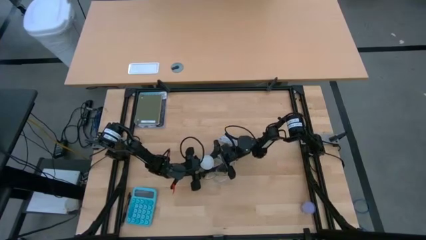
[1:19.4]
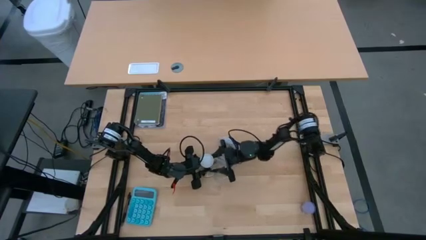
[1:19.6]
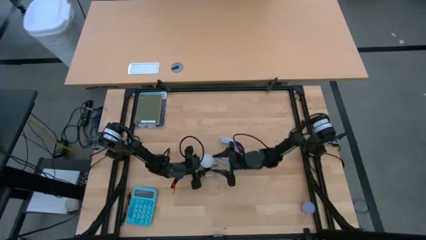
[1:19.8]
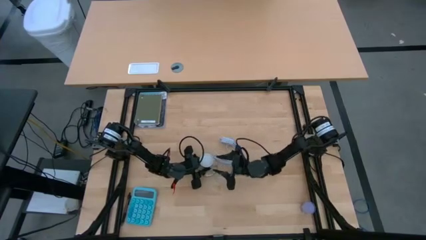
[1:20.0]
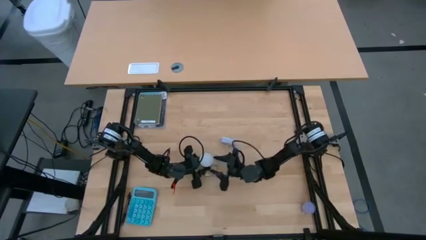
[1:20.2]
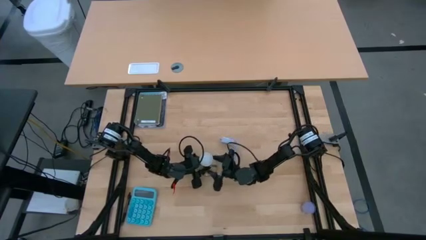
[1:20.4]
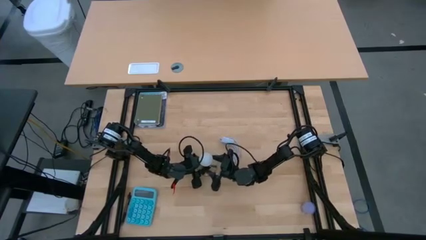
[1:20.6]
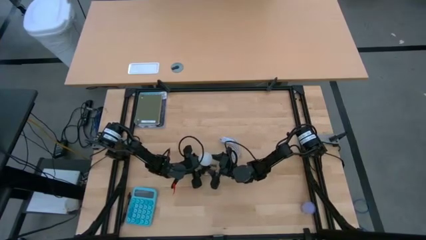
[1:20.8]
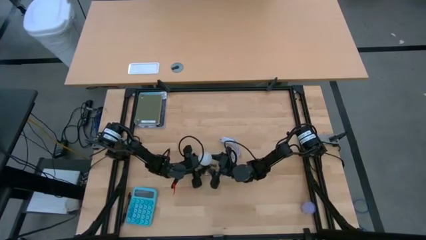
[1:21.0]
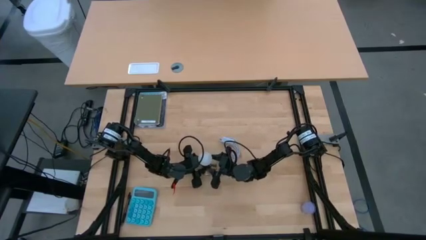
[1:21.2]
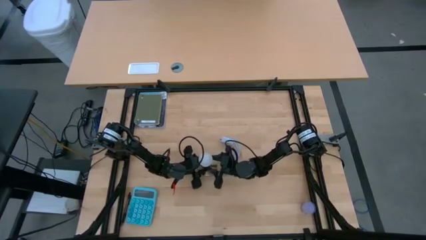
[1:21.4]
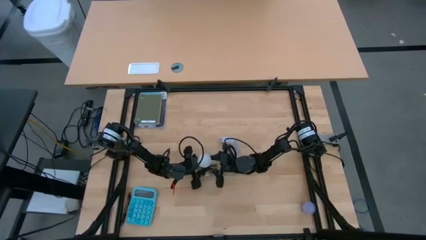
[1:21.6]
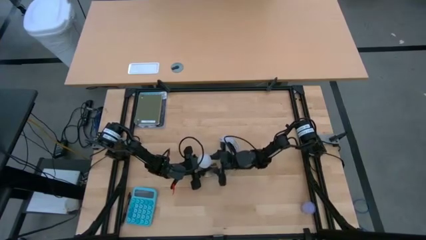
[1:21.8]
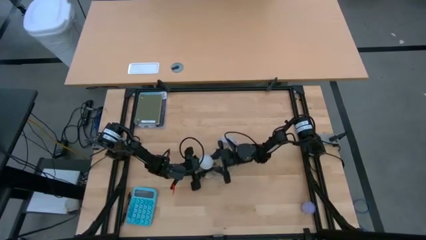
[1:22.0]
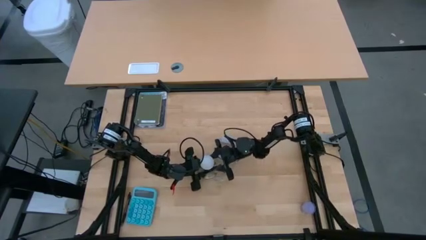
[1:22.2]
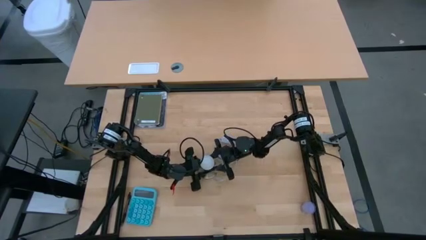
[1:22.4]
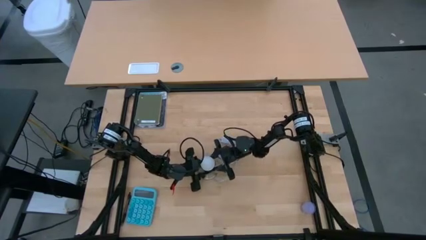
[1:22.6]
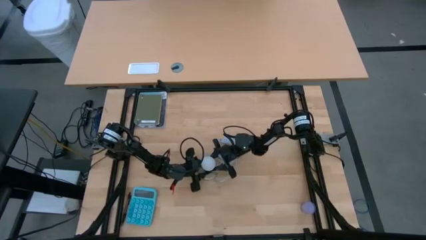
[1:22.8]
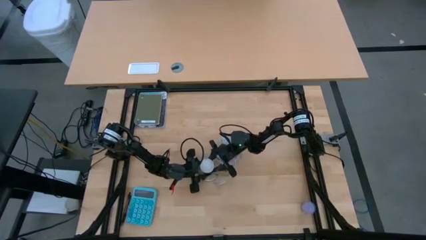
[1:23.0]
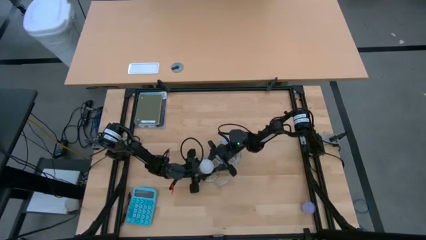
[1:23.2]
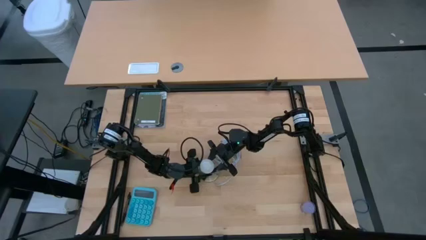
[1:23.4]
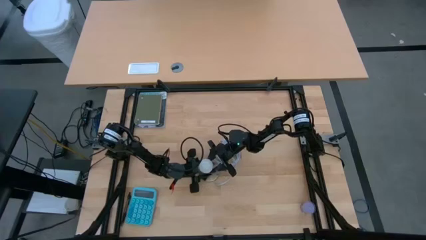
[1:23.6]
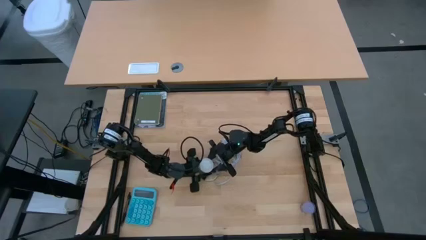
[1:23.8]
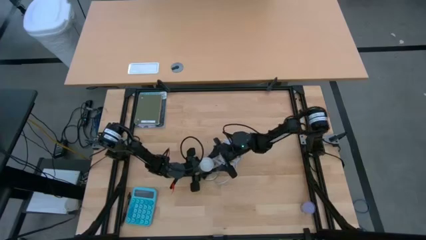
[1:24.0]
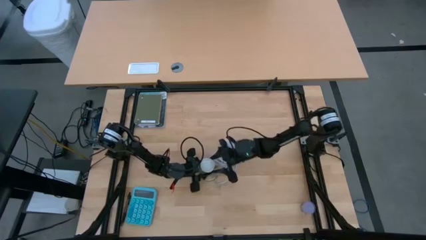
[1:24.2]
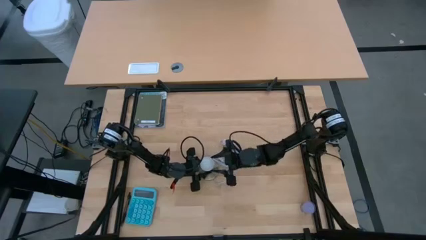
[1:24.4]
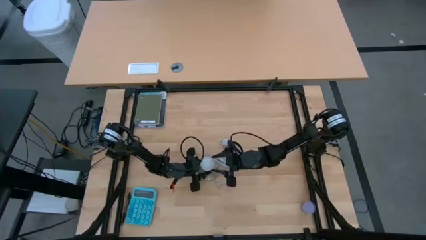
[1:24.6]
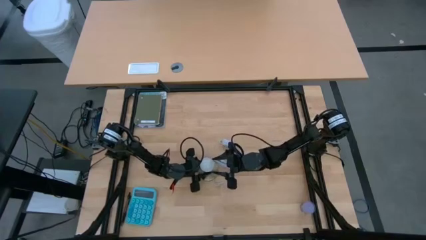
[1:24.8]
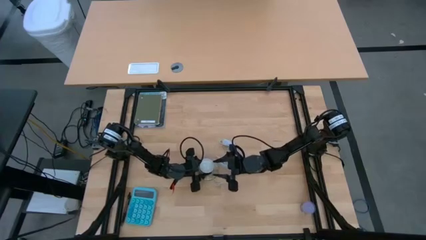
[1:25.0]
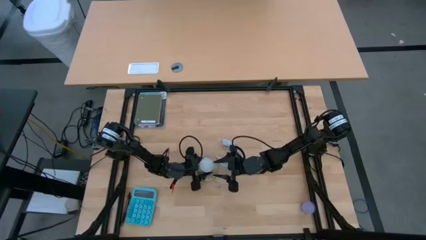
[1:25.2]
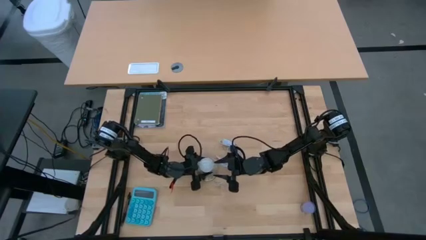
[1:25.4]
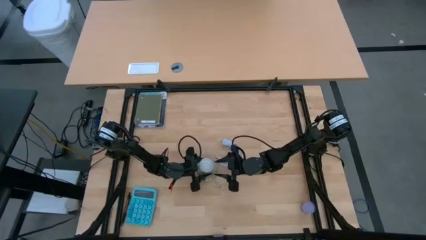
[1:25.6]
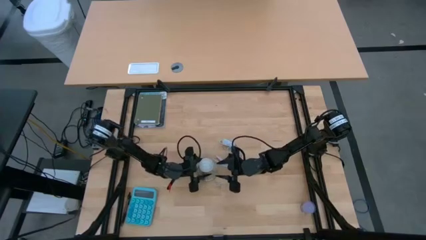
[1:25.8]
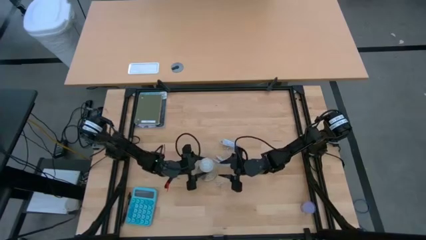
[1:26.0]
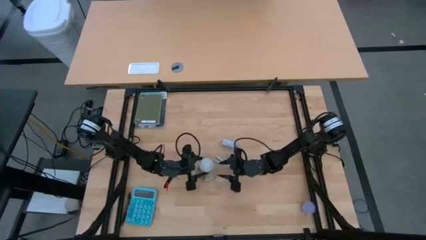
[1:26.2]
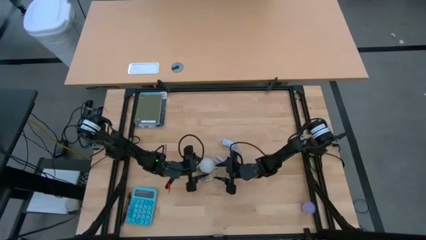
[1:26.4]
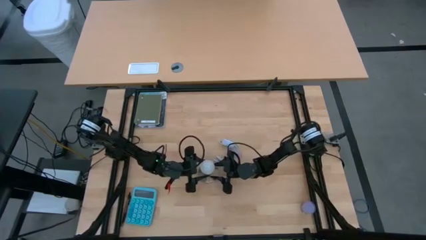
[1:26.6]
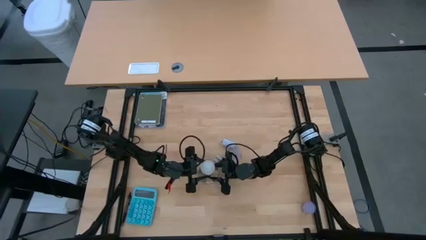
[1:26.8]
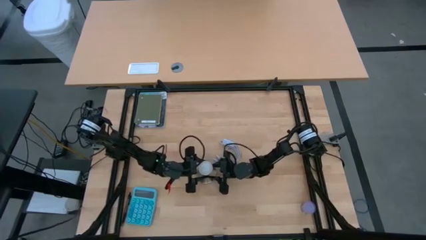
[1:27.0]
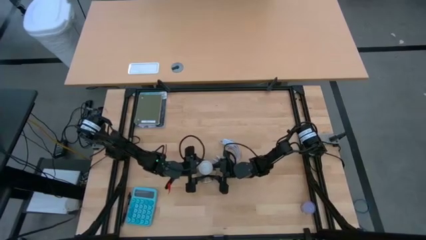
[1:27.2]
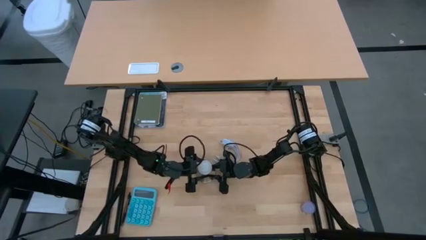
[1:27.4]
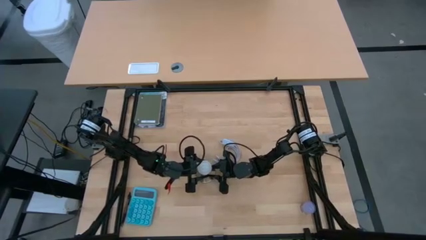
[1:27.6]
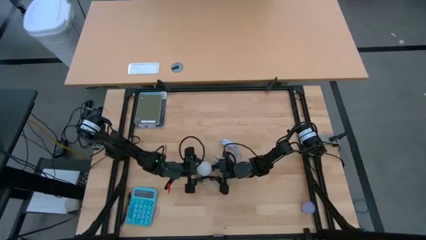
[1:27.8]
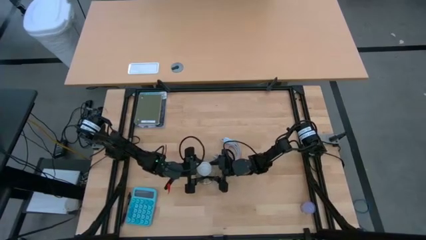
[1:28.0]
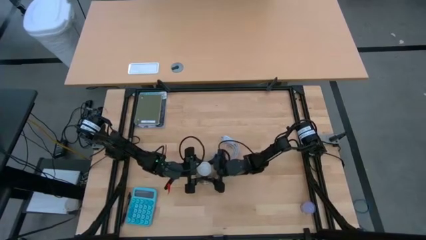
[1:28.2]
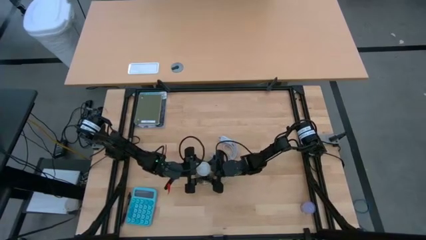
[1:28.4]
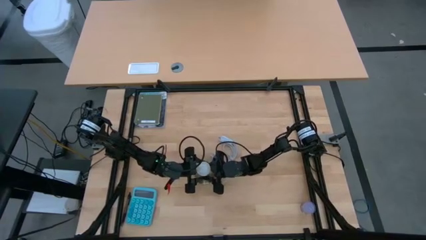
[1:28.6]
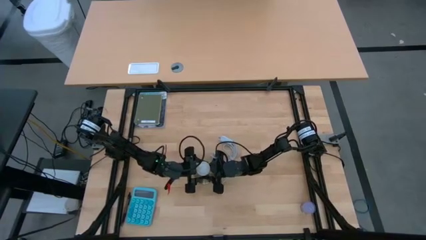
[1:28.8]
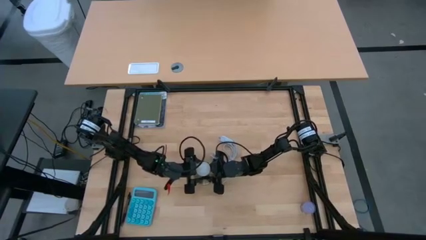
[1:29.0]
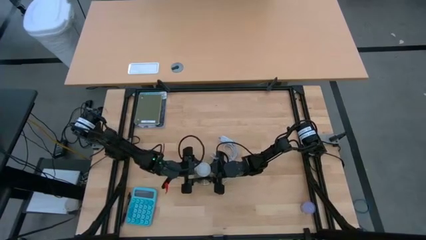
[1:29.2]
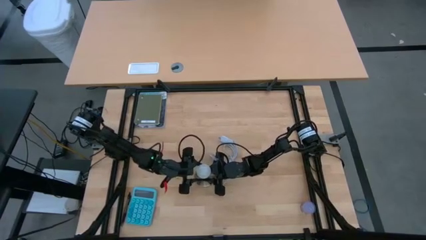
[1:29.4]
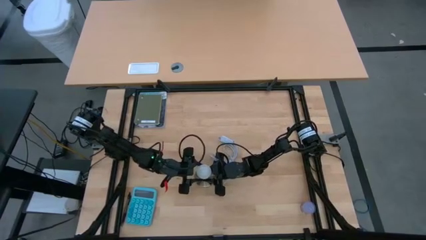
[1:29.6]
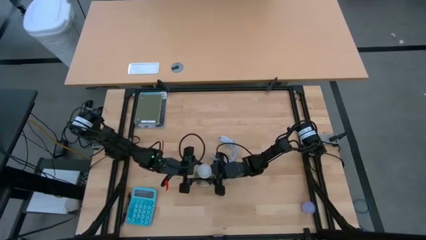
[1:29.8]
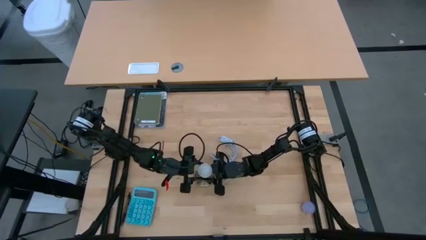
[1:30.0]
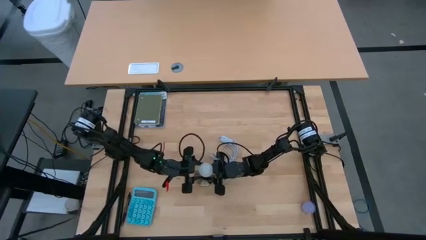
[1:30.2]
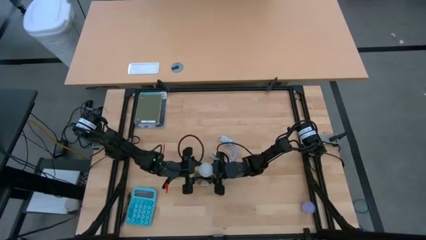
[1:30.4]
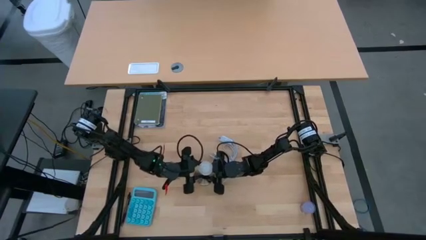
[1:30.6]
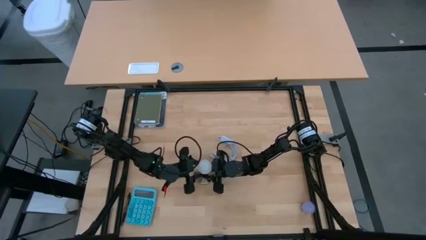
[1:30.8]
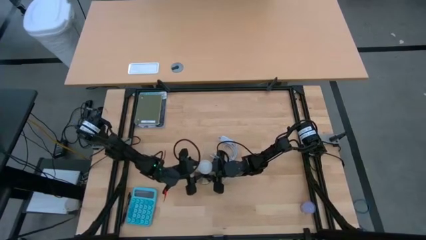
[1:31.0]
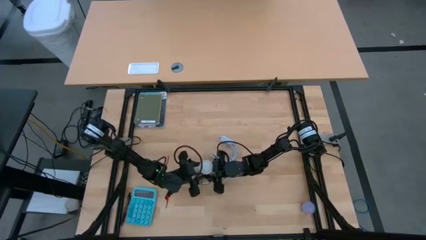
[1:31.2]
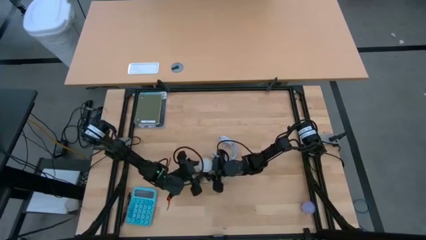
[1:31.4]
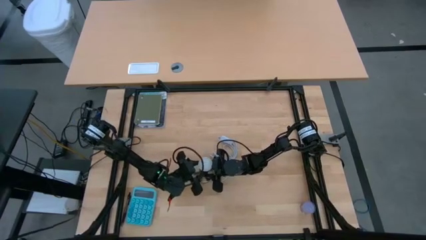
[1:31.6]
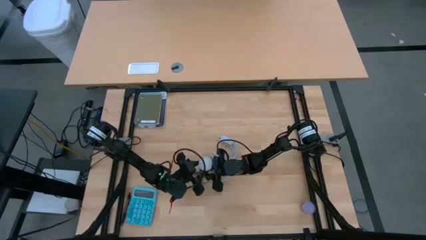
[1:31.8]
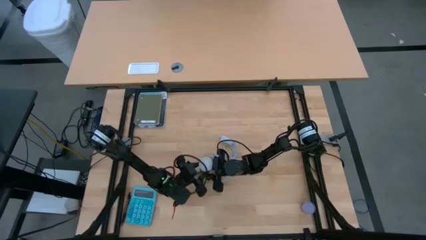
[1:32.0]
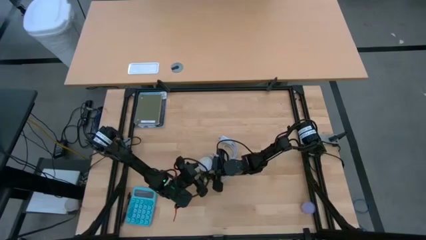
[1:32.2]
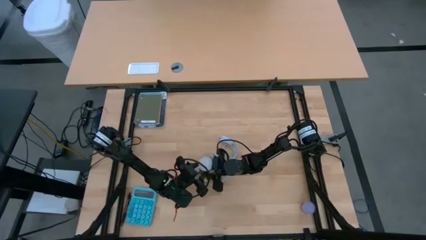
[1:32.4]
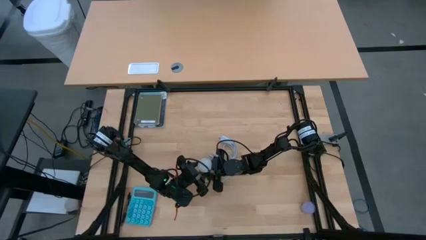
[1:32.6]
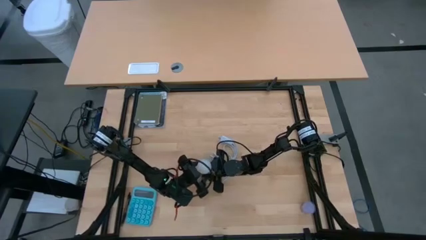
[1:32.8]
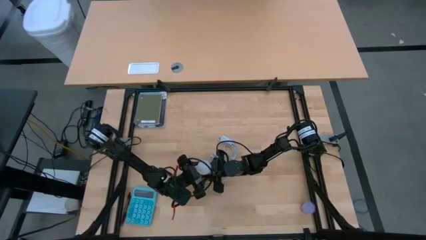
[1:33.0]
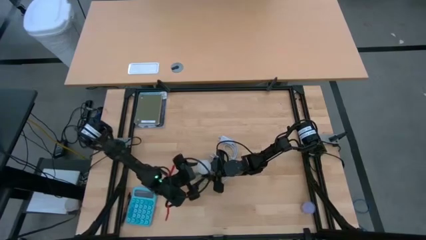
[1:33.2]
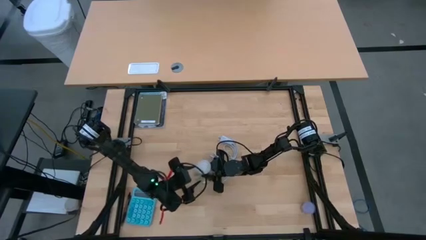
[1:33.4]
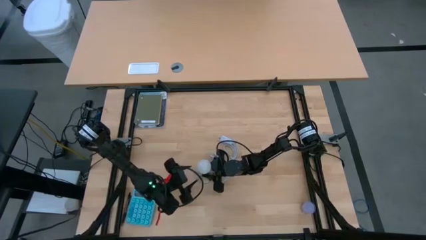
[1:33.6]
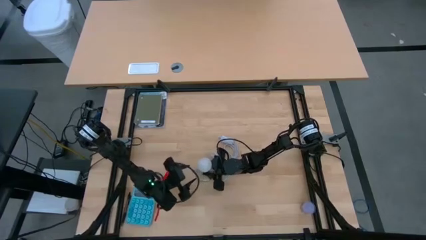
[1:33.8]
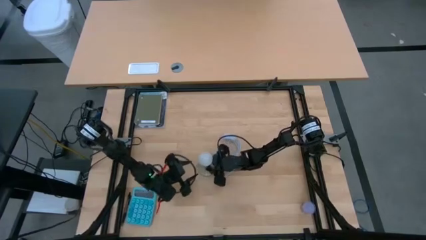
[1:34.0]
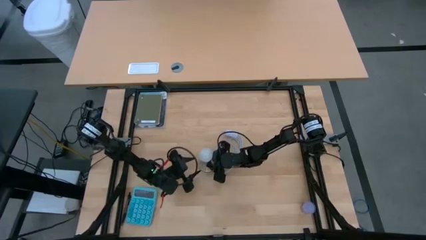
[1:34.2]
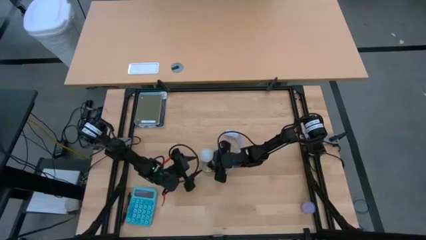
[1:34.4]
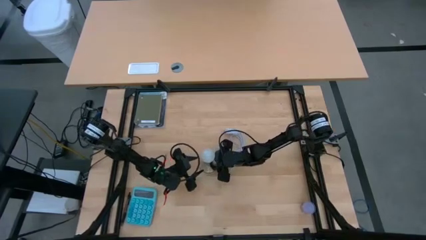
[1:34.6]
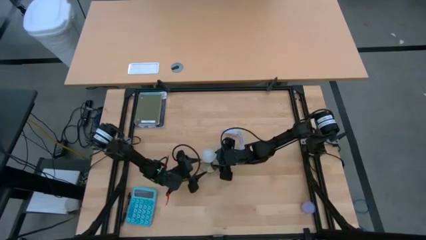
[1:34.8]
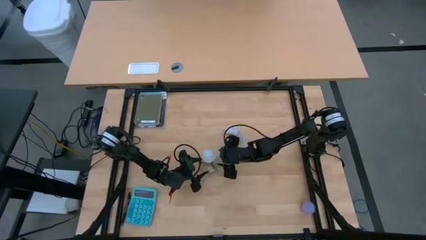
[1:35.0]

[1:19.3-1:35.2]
Task: Screw lightbulb
Remove the lightbulb from the lamp
